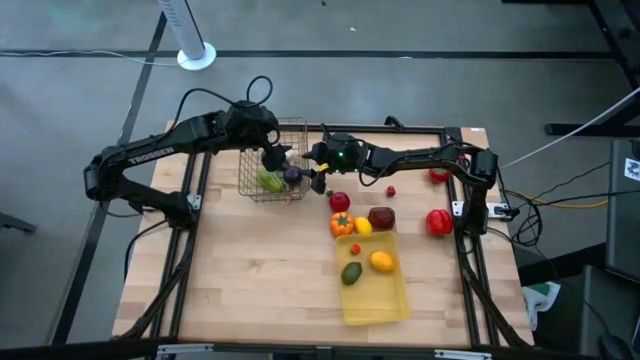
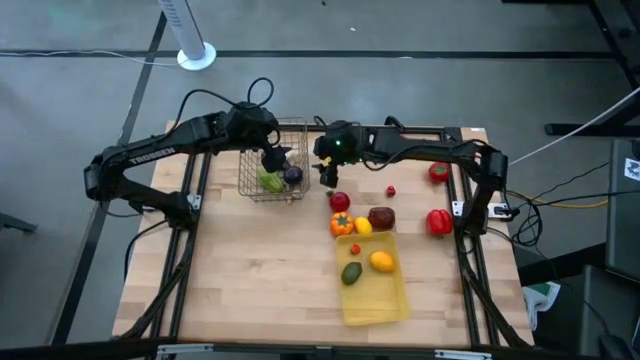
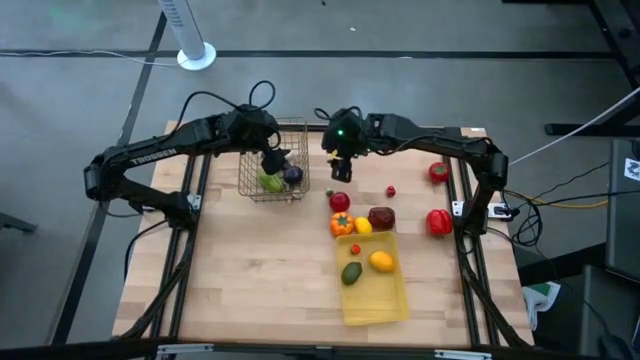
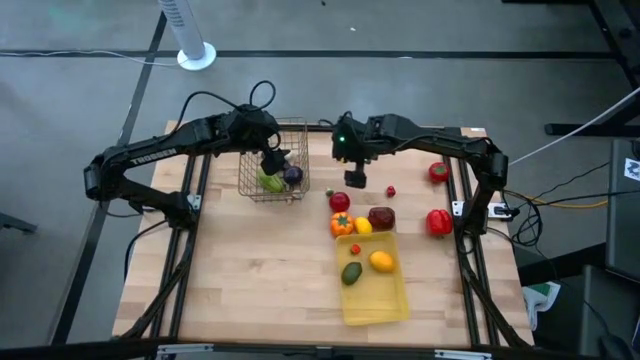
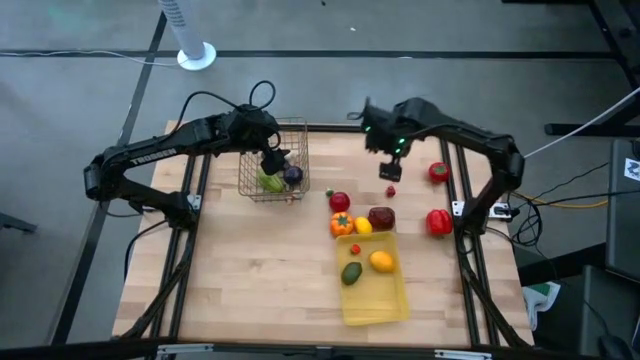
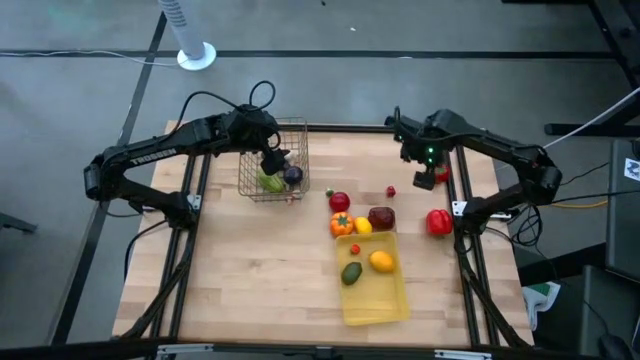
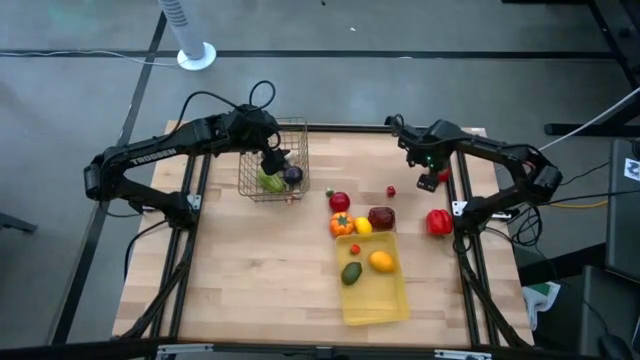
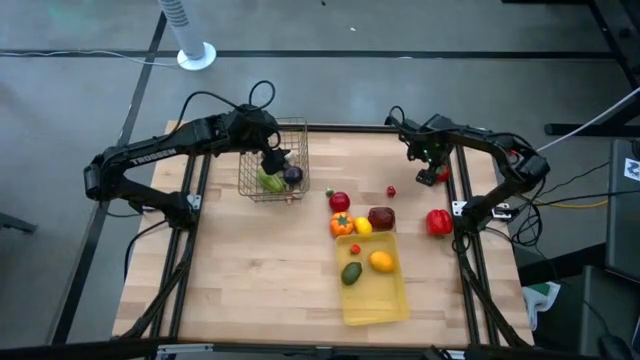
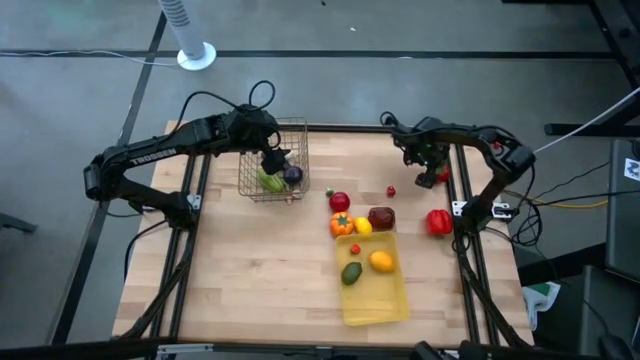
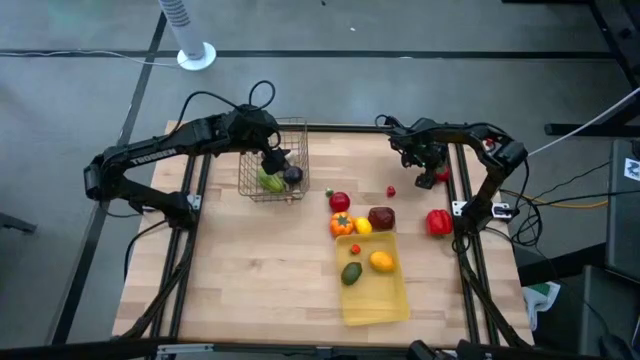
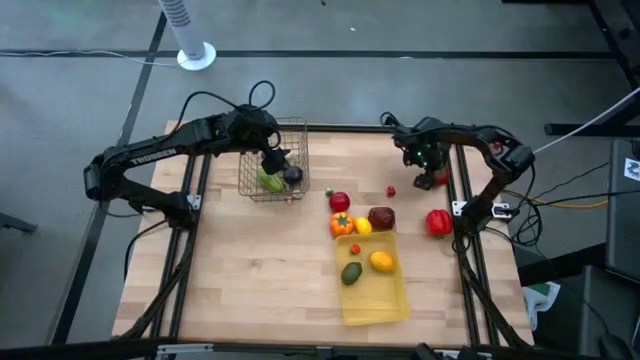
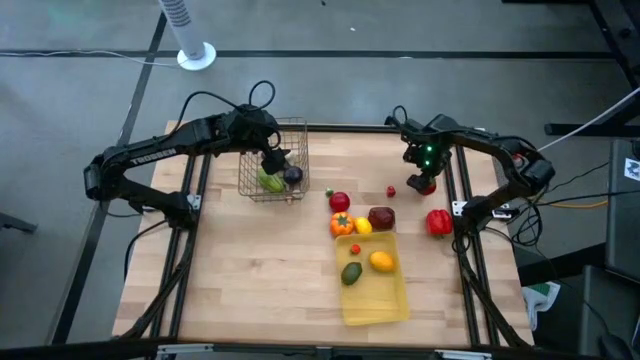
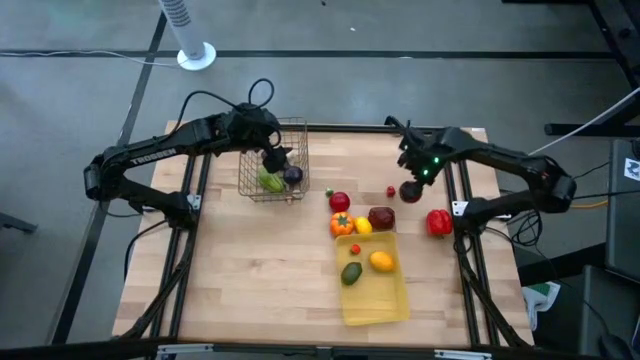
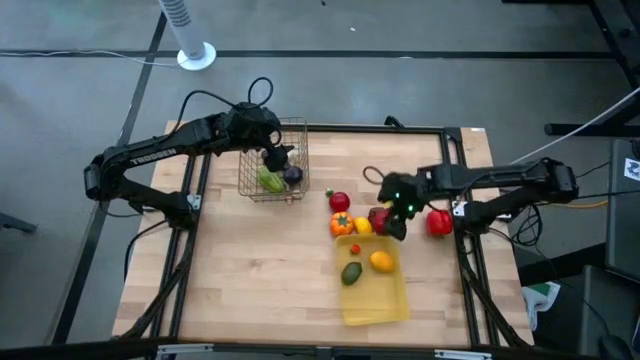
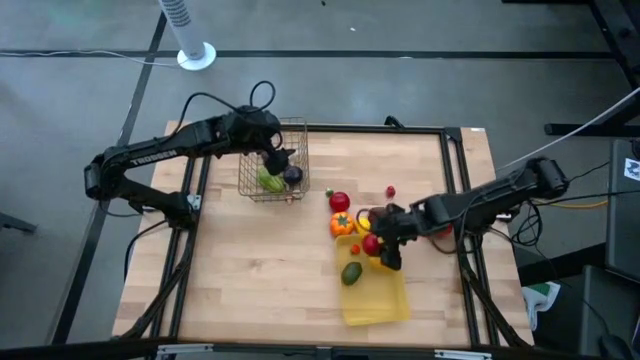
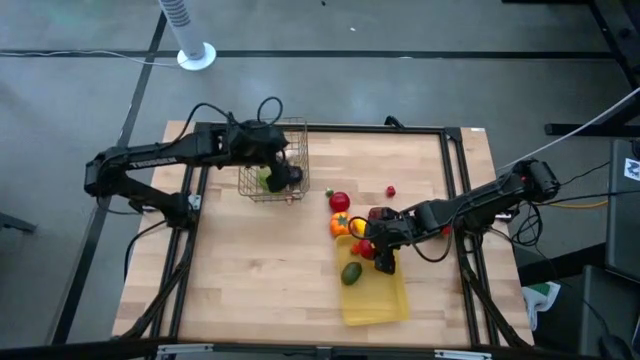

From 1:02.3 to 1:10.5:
Task: Sort produce into baskets
Put the right red tomato into the yellow bin

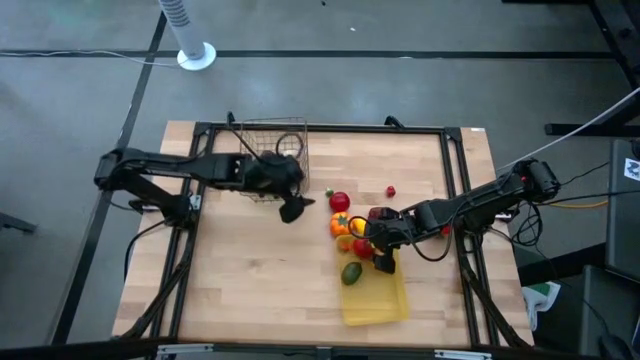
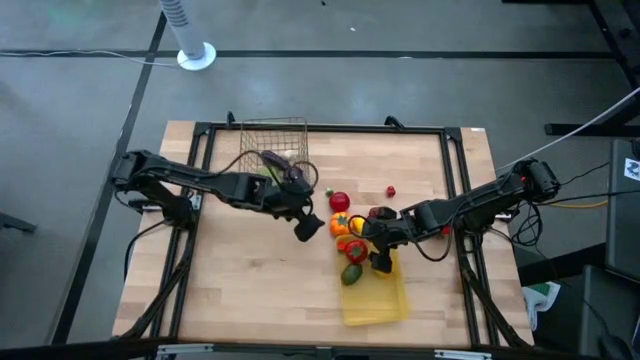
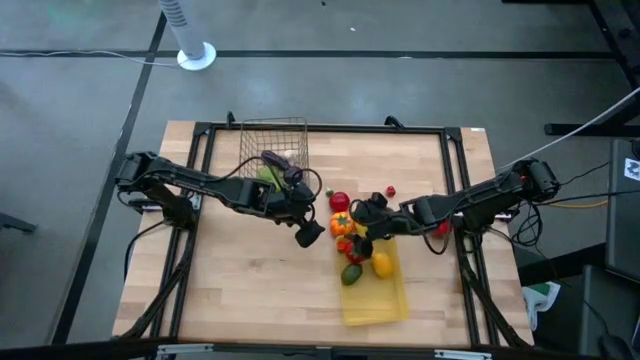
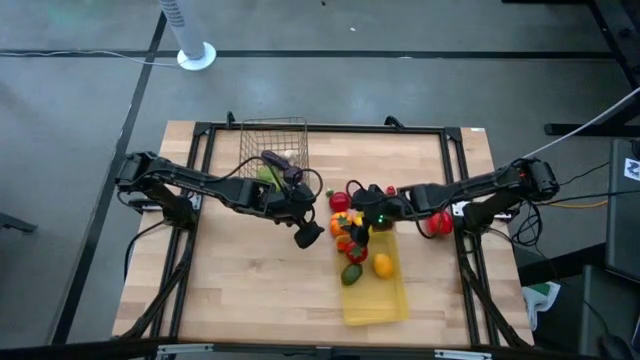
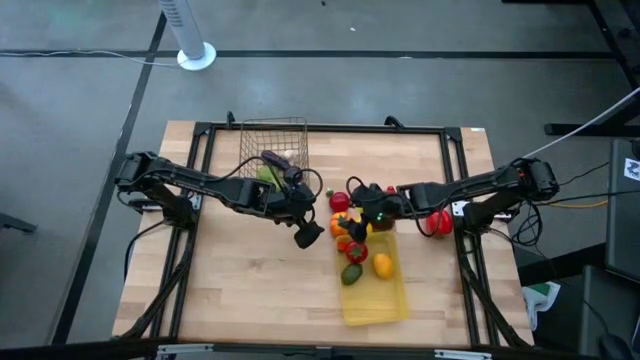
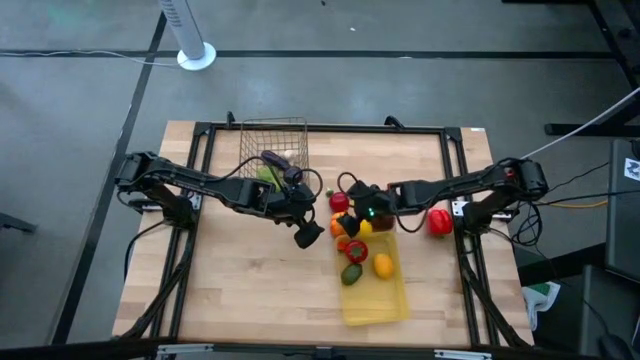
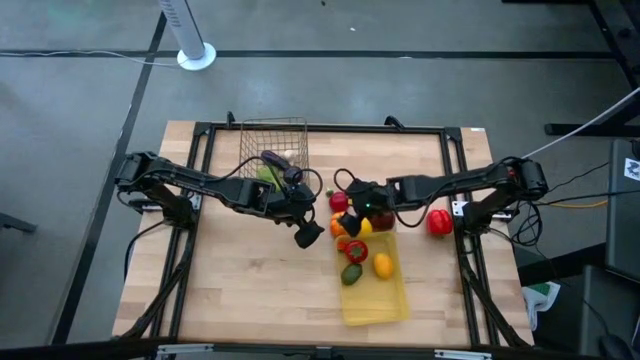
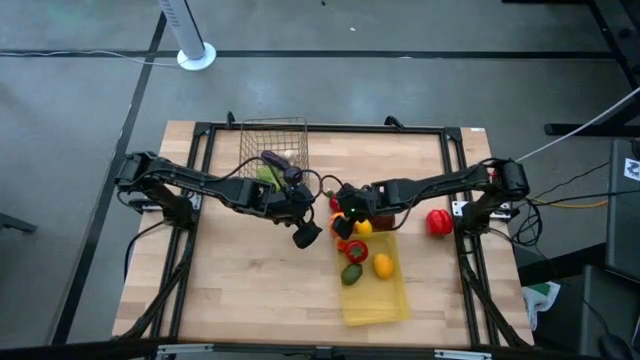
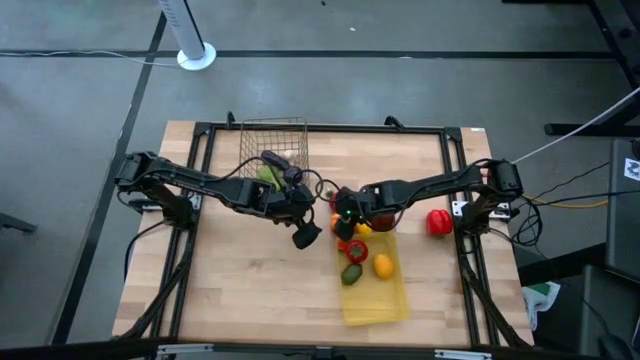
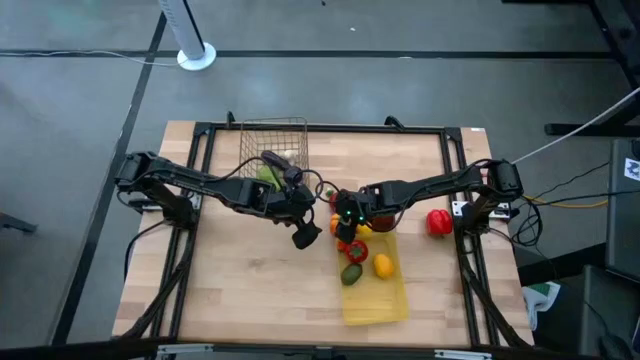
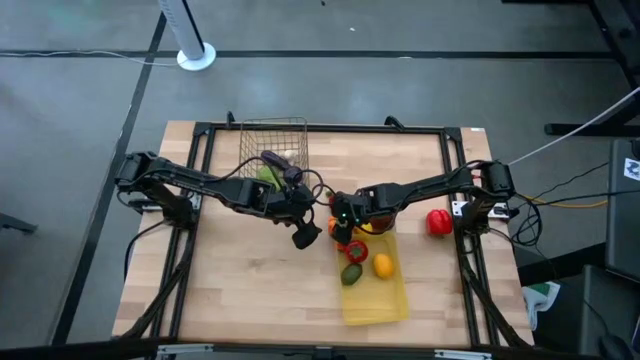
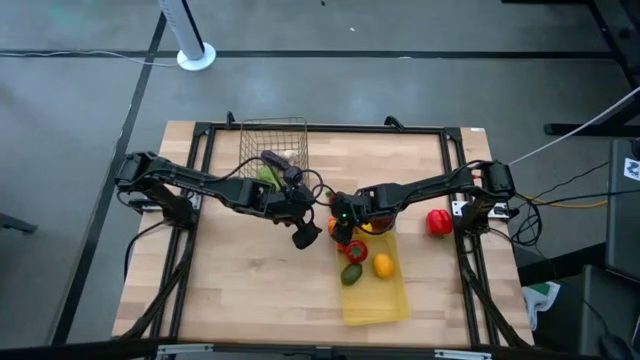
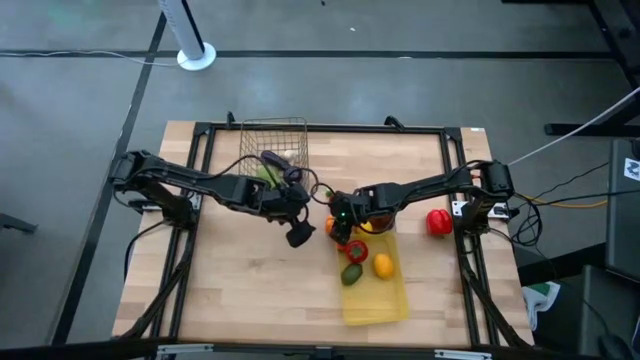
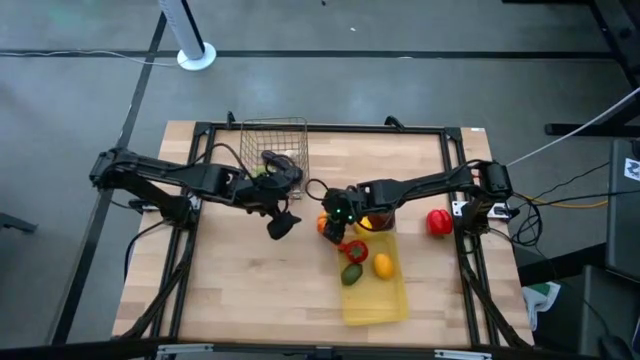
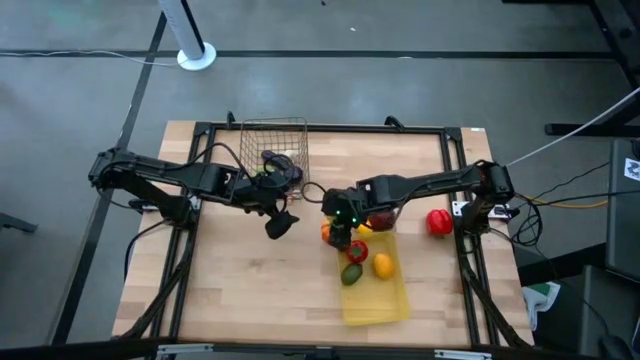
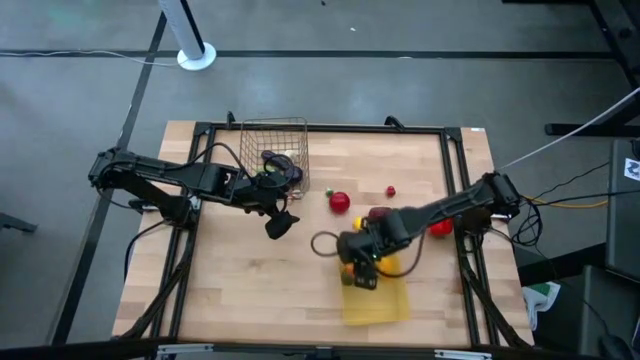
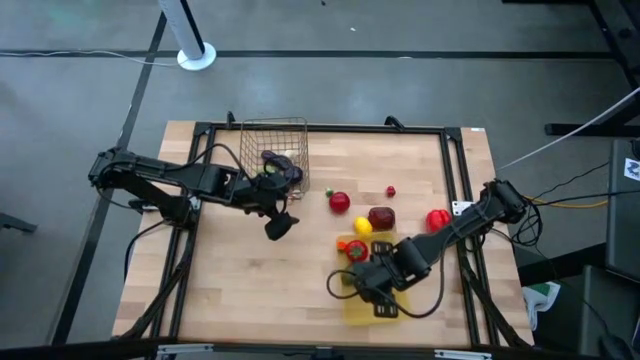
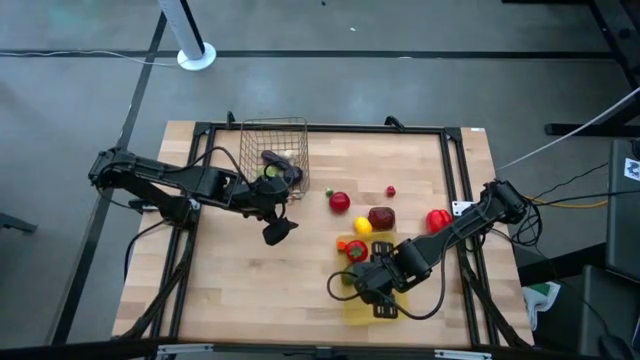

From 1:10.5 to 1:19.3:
Put the orange tomato into the yellow bin

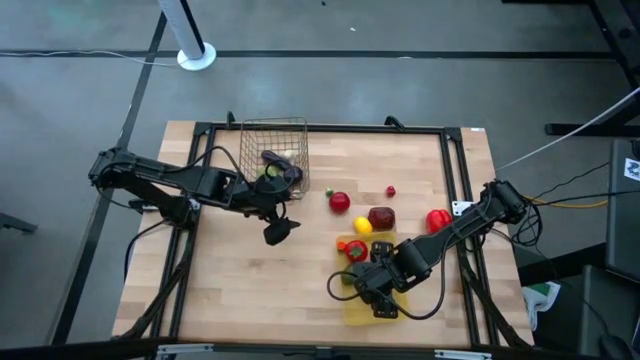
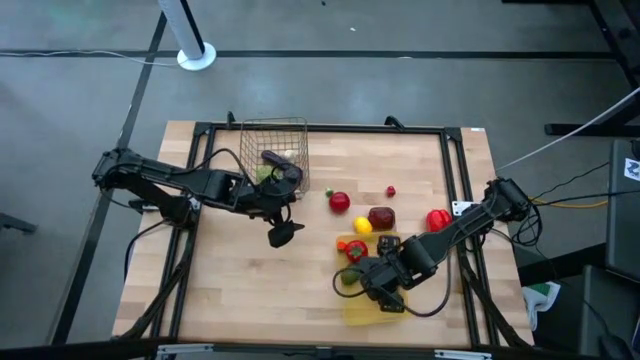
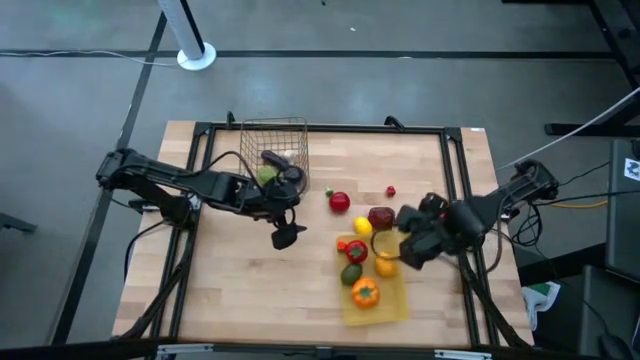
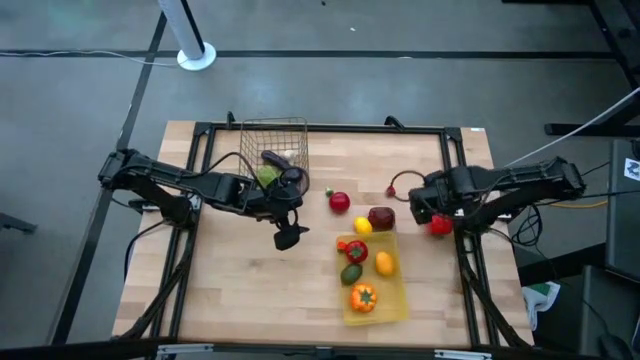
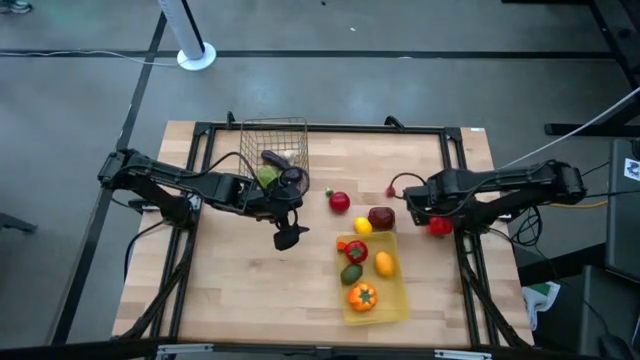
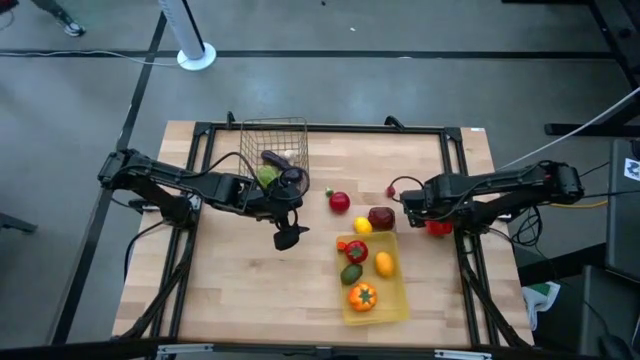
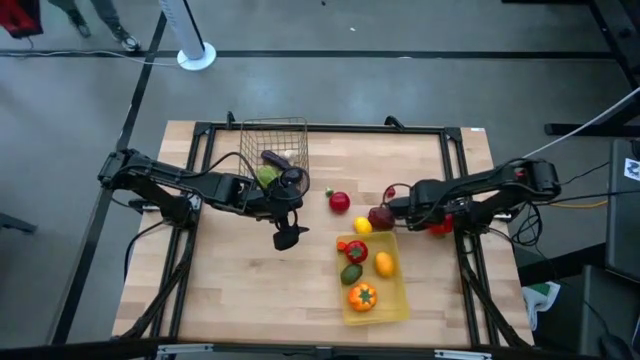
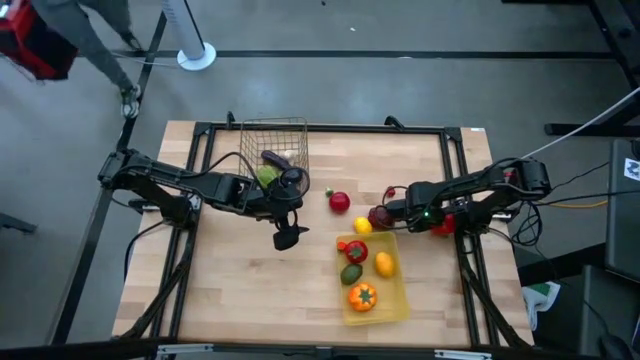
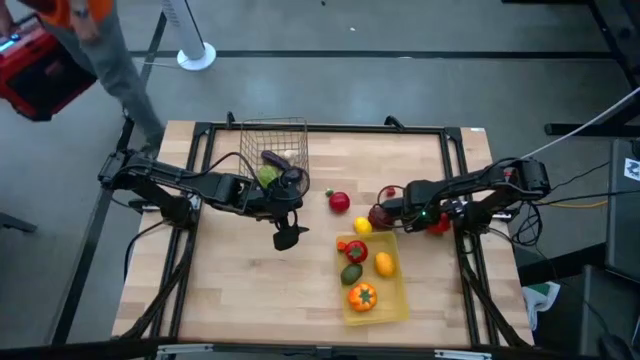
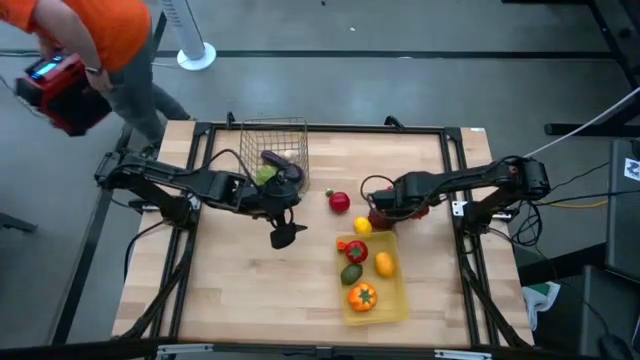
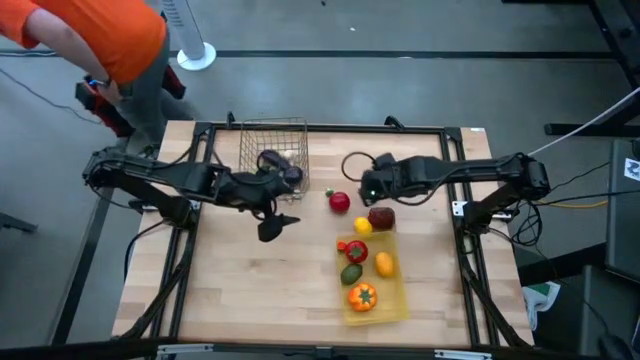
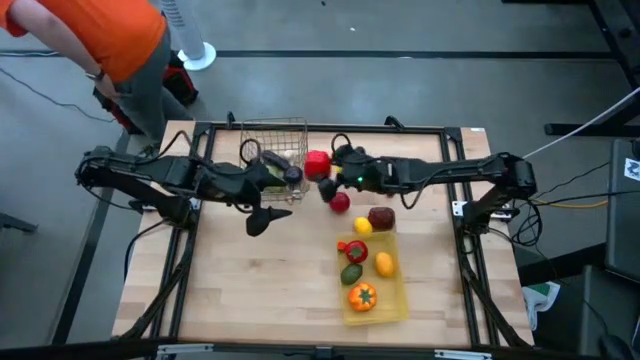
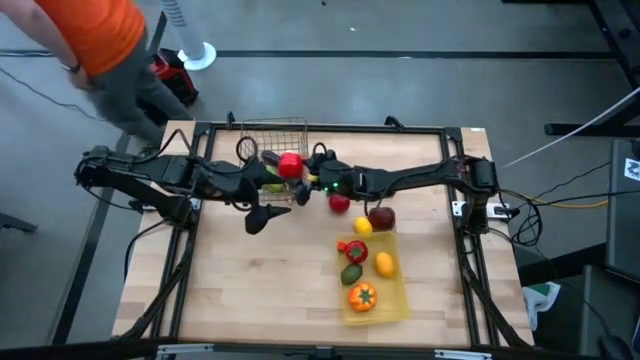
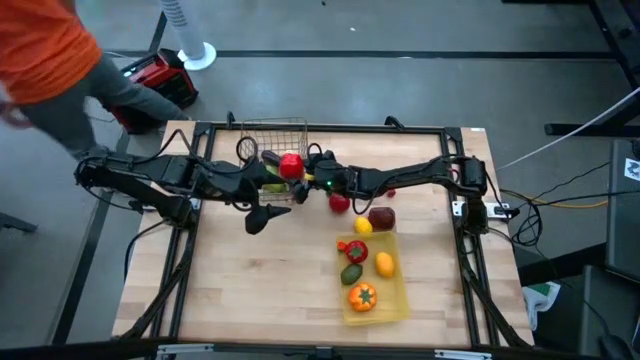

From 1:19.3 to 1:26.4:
Put the red bell pepper into the brown wire basket
